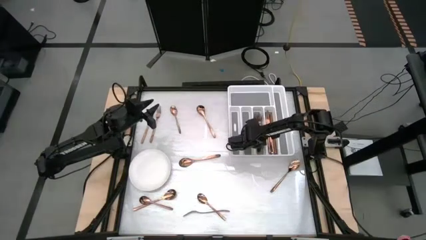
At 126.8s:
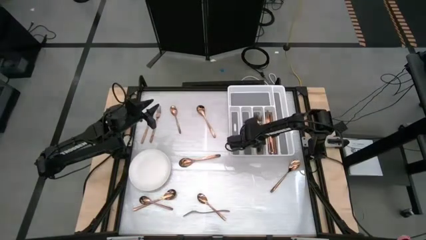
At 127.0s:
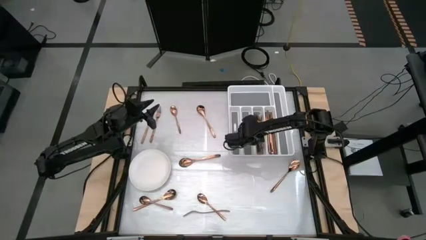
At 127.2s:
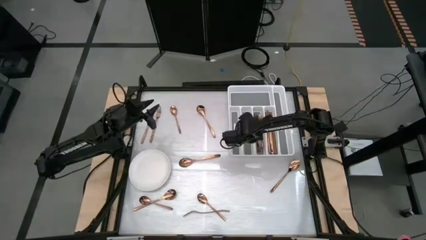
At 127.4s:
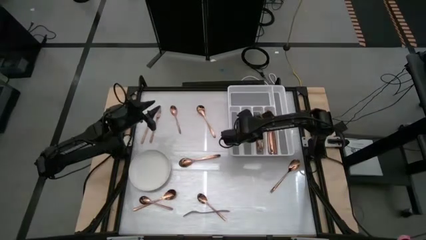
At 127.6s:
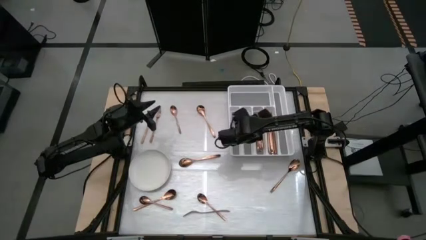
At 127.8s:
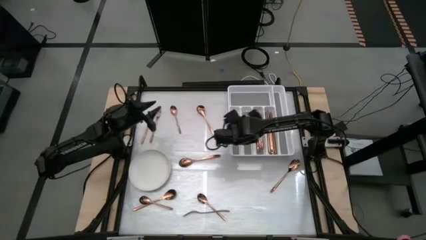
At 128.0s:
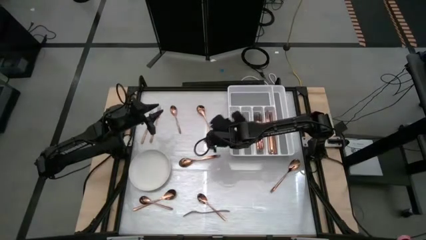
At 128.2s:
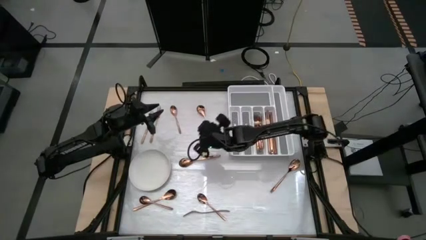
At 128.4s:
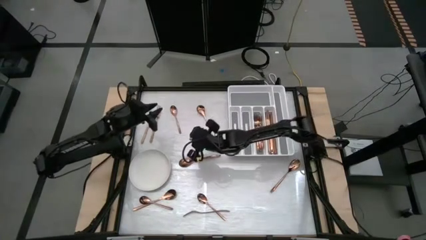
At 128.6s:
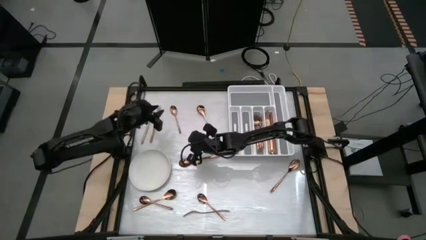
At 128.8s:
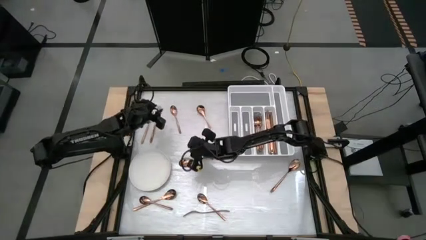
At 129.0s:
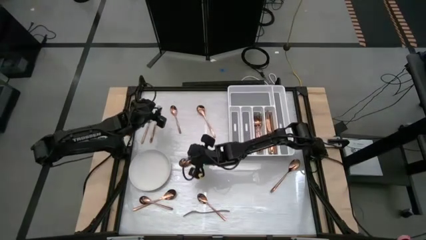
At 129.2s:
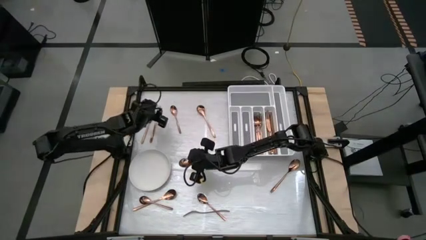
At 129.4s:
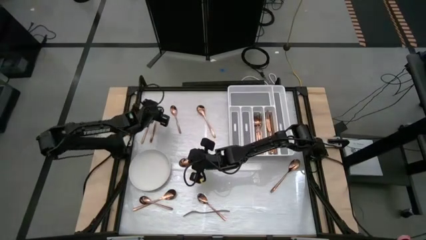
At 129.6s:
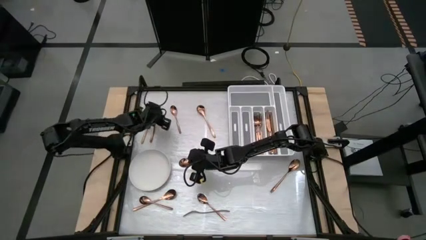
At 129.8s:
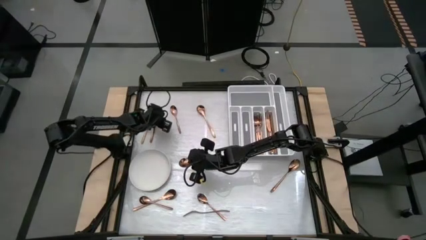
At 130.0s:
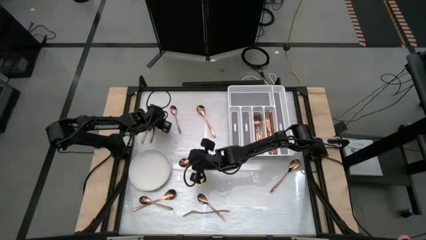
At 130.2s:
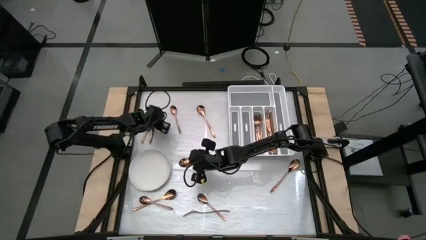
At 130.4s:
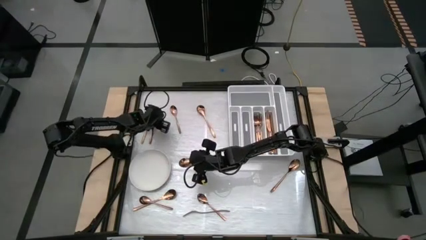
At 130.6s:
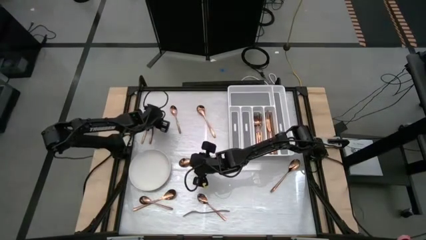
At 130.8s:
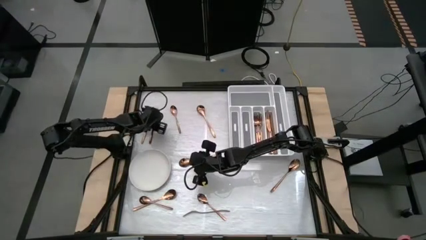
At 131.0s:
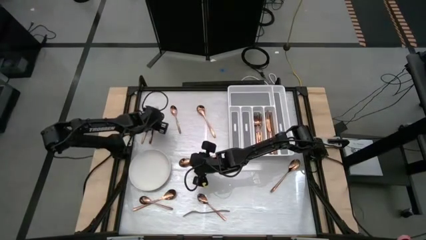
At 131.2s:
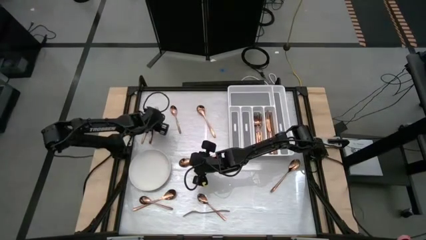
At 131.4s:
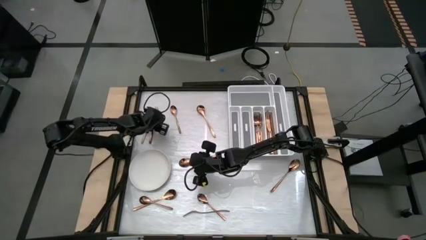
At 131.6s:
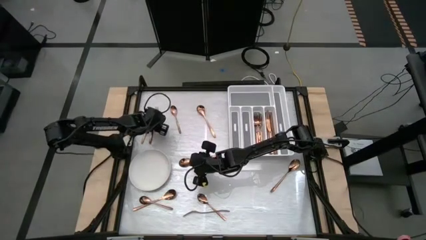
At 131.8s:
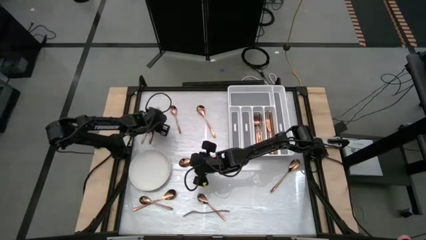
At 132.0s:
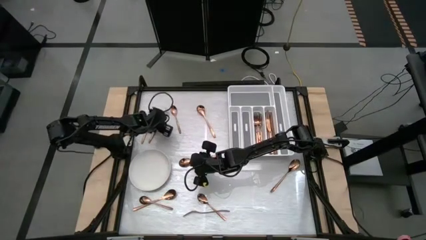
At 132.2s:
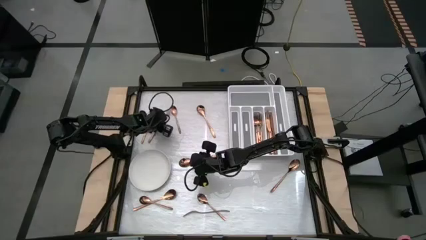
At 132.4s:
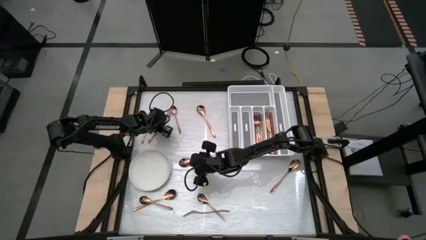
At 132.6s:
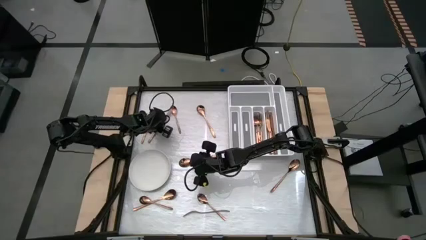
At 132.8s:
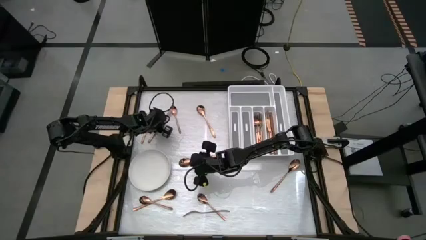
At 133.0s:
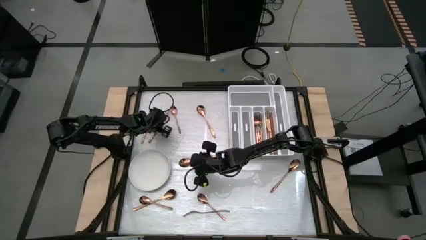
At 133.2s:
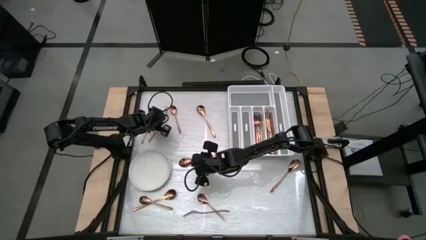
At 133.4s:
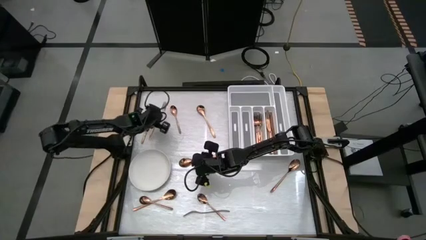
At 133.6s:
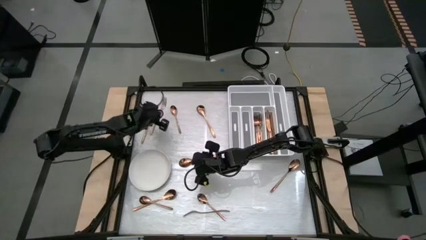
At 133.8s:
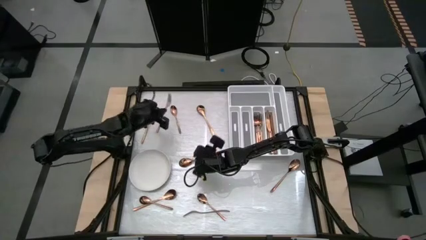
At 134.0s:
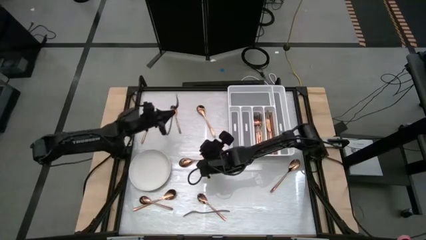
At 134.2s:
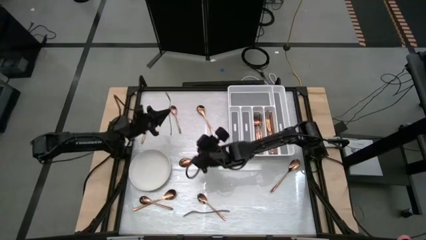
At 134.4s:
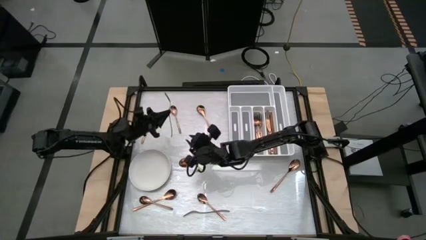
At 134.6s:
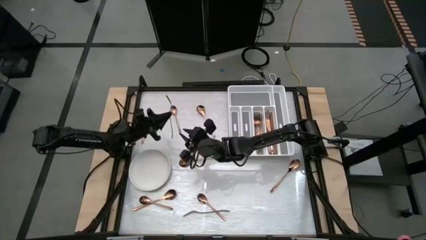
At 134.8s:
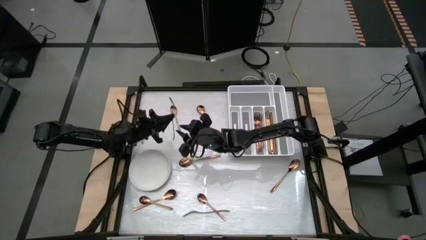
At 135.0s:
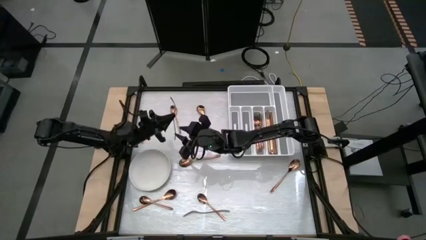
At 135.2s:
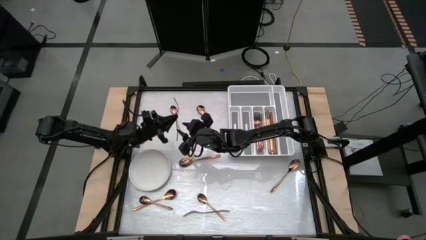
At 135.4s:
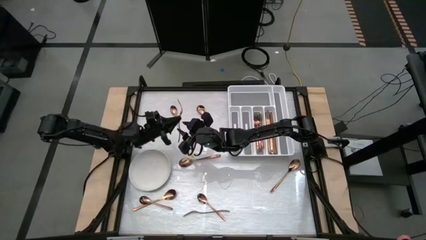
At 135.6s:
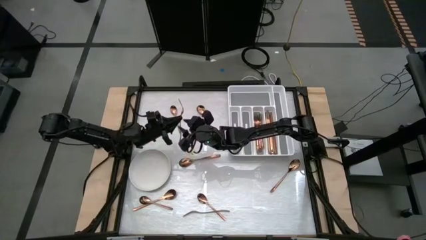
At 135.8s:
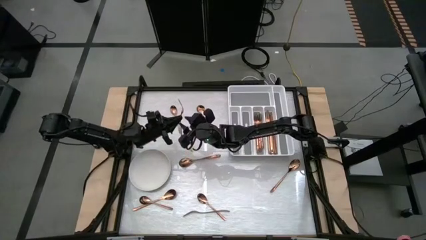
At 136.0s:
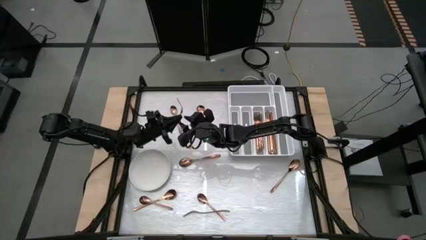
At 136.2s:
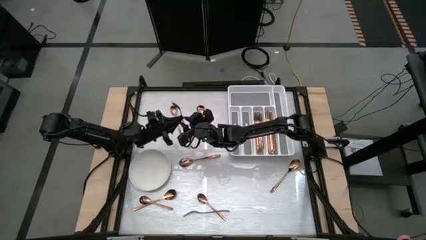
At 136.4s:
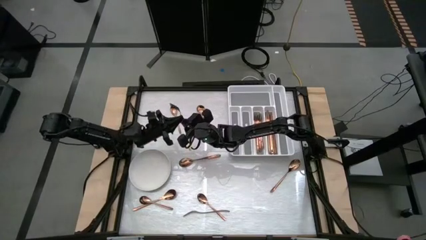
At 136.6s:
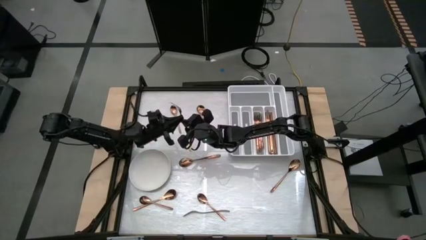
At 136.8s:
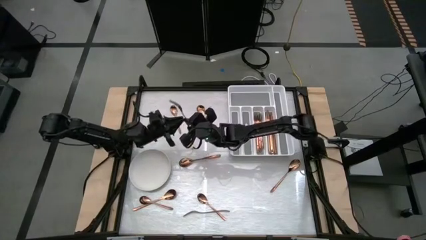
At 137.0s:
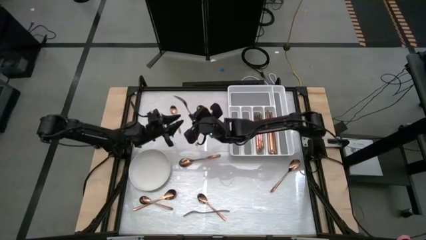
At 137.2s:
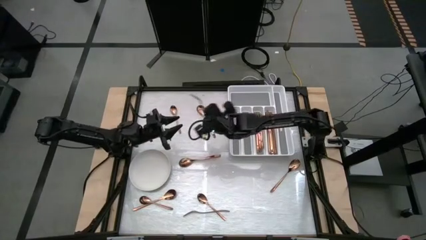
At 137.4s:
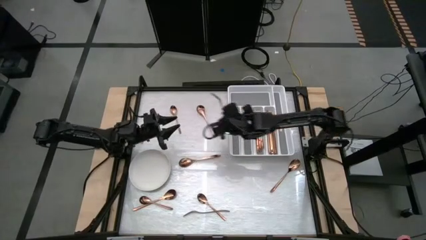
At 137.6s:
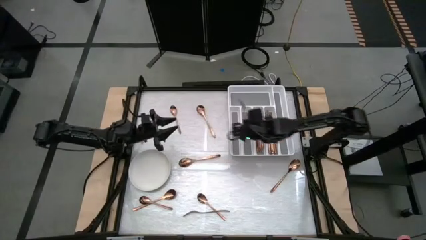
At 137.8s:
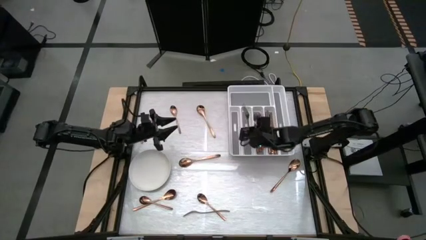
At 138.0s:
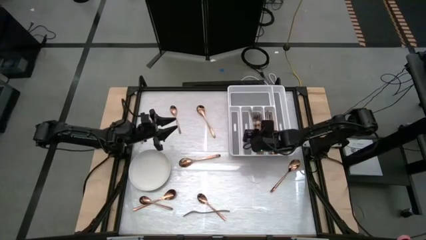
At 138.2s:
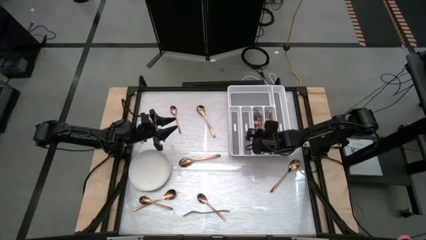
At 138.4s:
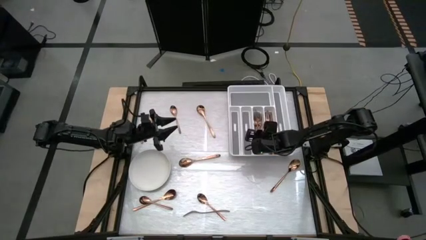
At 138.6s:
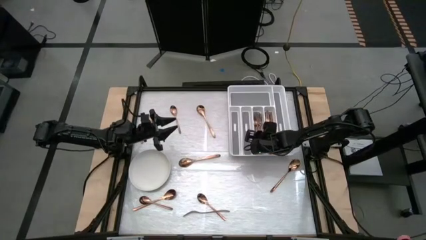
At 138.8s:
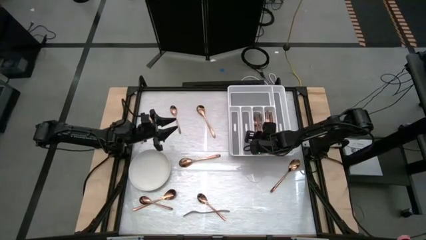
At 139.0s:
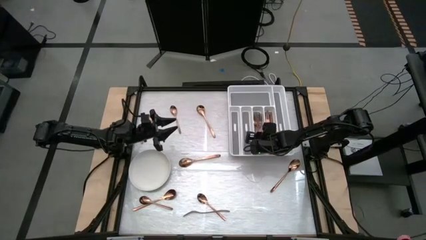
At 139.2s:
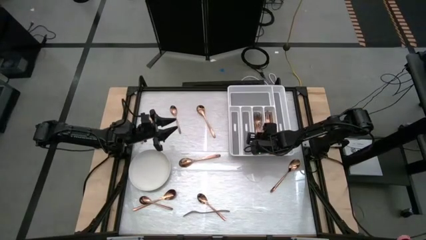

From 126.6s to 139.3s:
Task: Sort silverware
Put the bronze fork into the silverware tray
